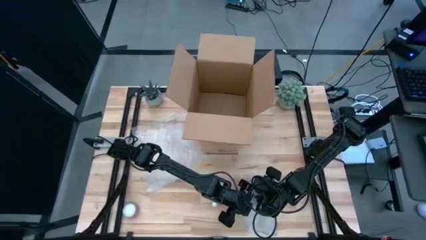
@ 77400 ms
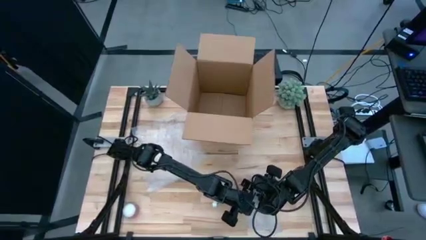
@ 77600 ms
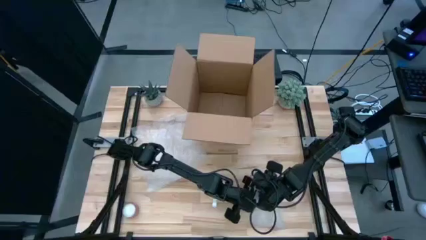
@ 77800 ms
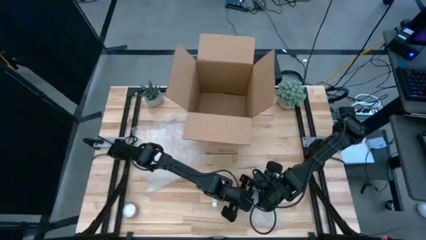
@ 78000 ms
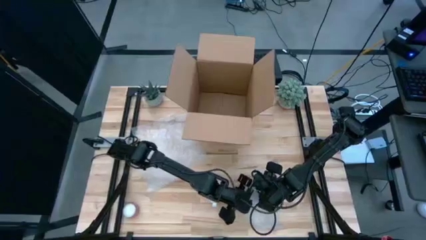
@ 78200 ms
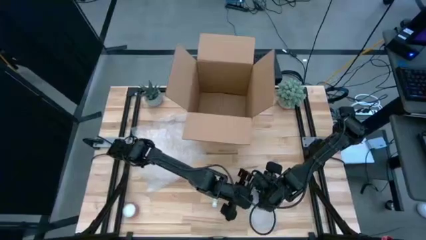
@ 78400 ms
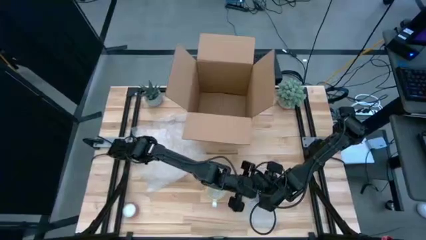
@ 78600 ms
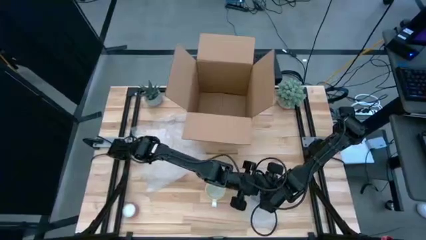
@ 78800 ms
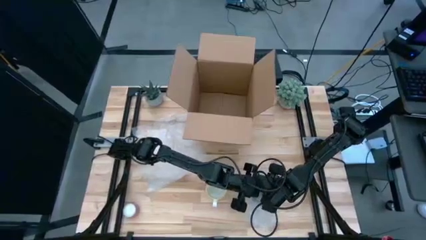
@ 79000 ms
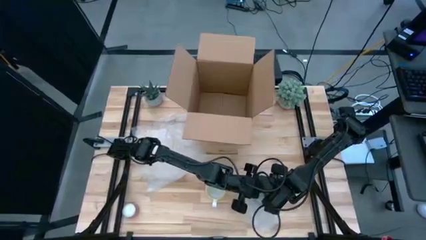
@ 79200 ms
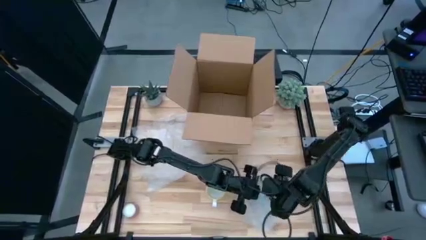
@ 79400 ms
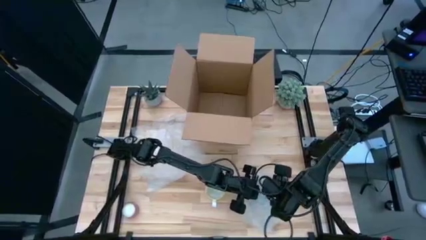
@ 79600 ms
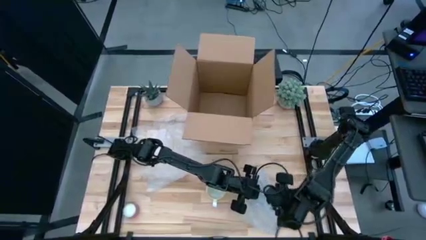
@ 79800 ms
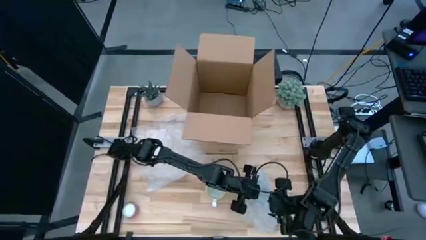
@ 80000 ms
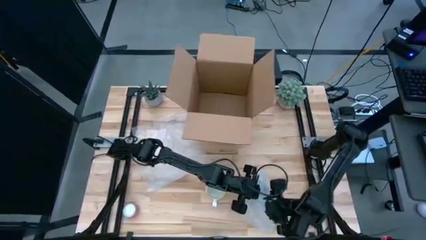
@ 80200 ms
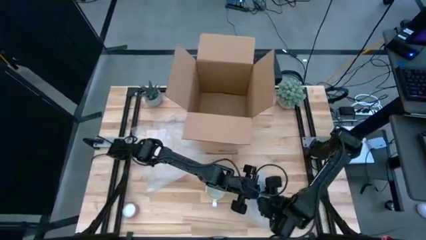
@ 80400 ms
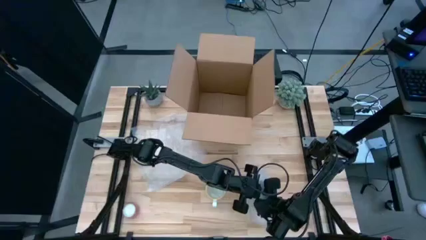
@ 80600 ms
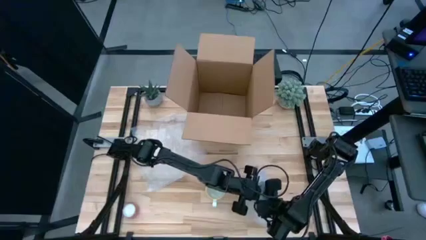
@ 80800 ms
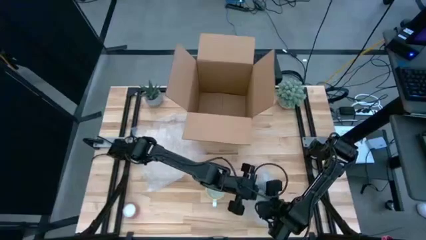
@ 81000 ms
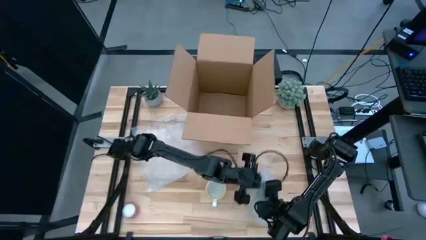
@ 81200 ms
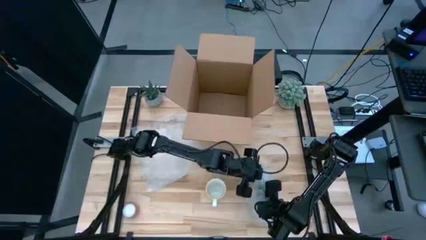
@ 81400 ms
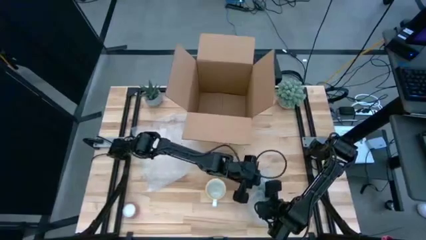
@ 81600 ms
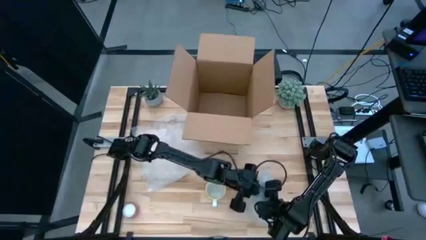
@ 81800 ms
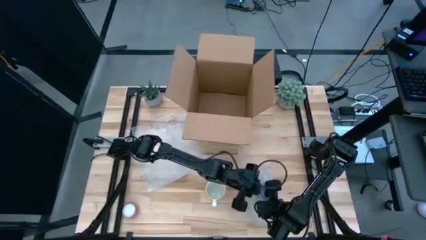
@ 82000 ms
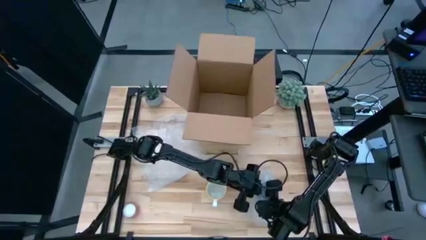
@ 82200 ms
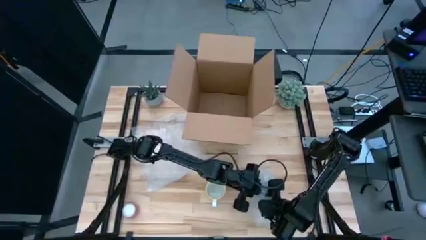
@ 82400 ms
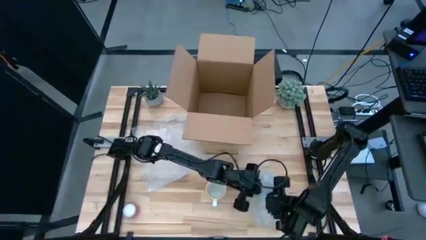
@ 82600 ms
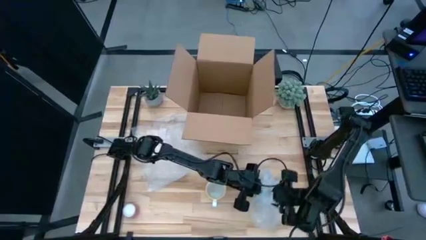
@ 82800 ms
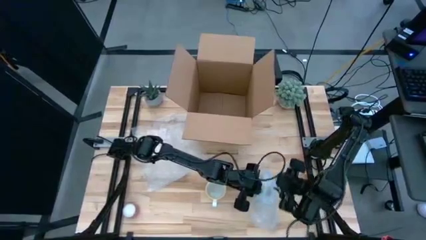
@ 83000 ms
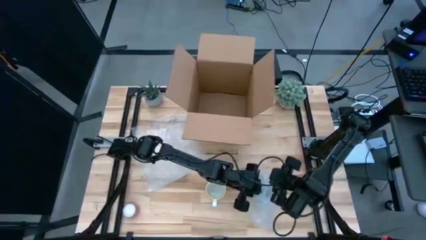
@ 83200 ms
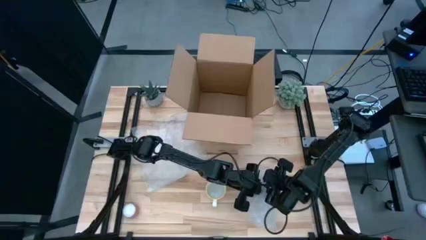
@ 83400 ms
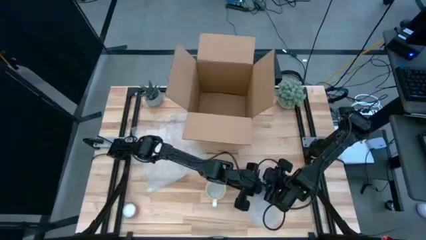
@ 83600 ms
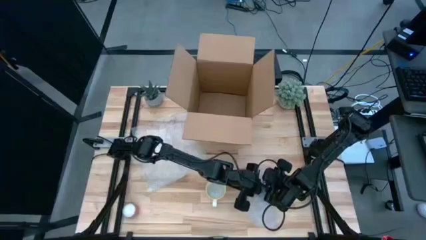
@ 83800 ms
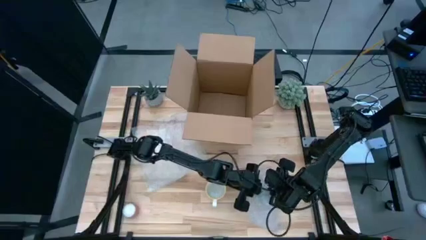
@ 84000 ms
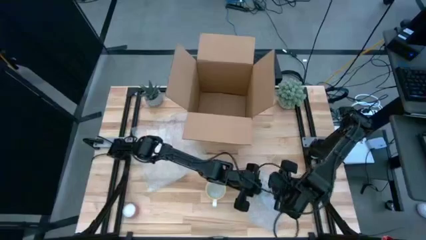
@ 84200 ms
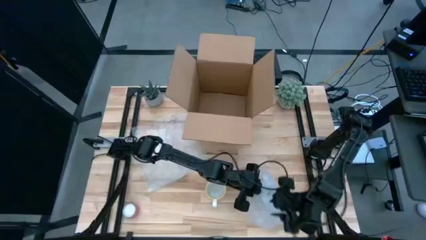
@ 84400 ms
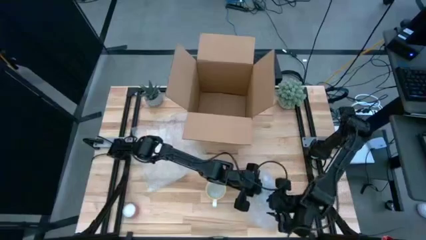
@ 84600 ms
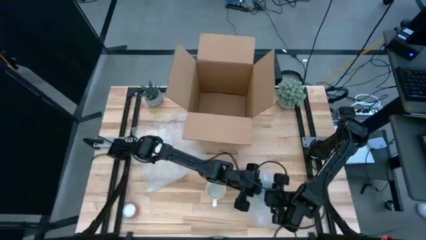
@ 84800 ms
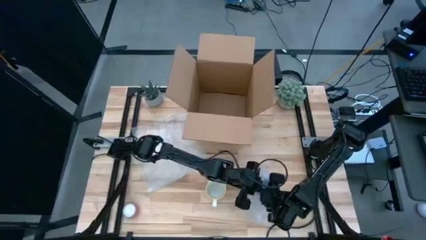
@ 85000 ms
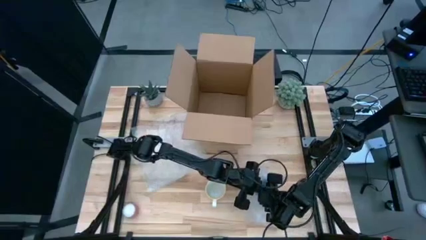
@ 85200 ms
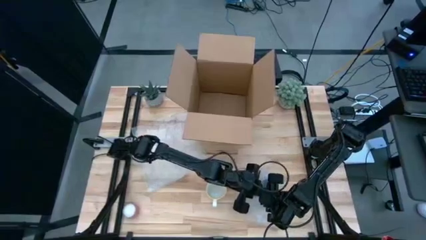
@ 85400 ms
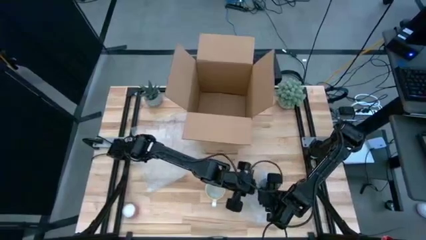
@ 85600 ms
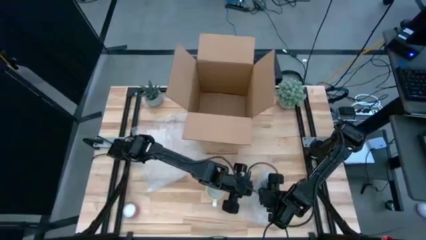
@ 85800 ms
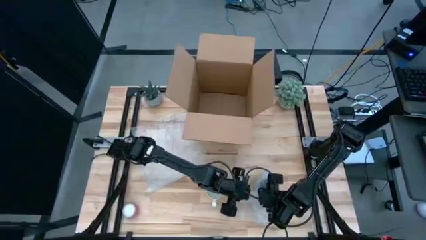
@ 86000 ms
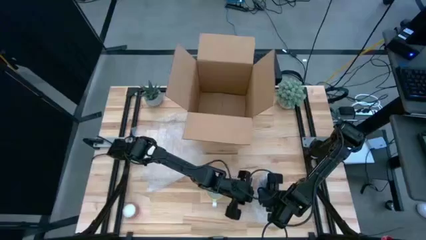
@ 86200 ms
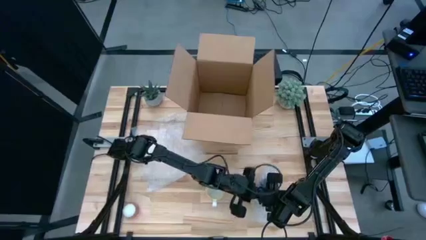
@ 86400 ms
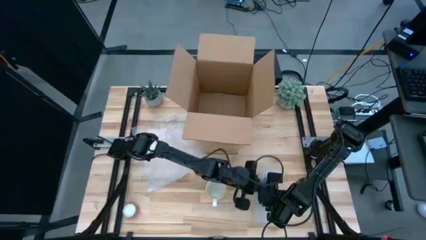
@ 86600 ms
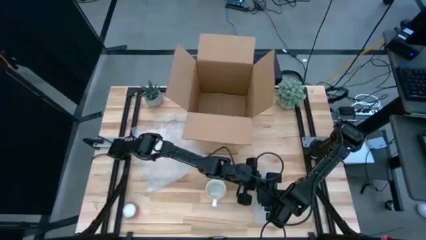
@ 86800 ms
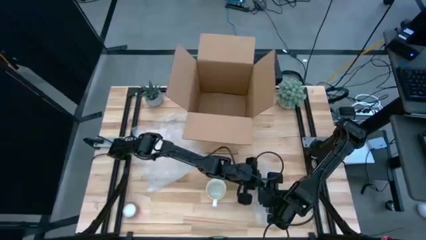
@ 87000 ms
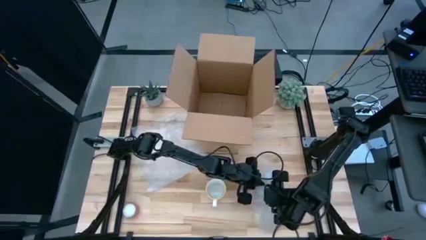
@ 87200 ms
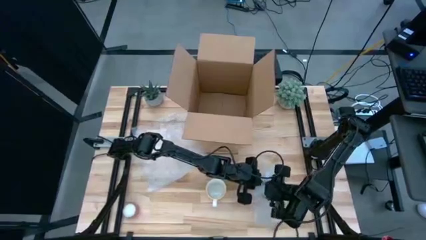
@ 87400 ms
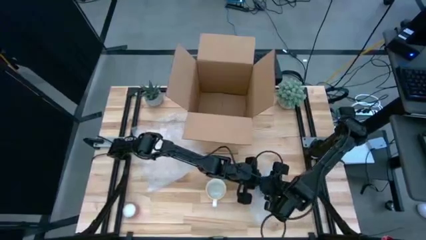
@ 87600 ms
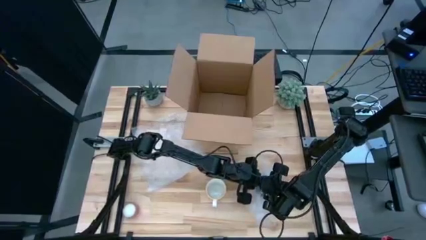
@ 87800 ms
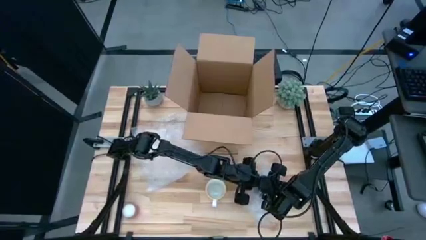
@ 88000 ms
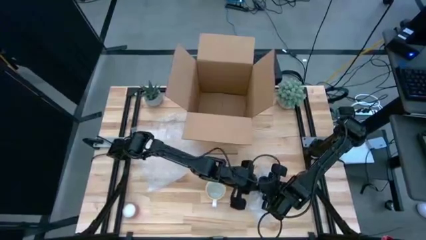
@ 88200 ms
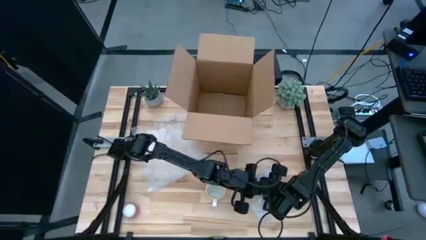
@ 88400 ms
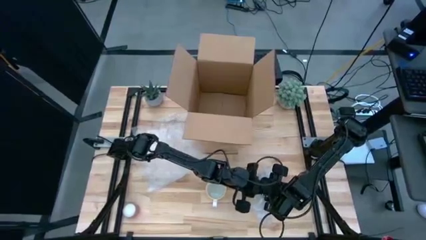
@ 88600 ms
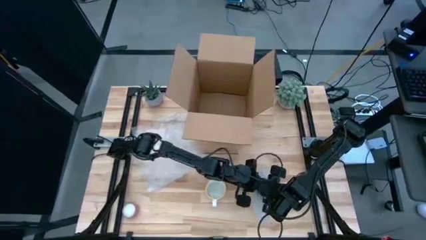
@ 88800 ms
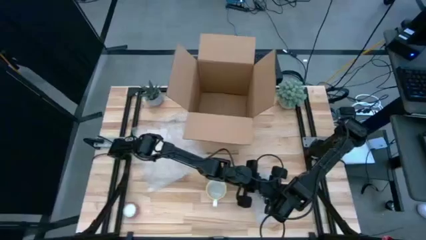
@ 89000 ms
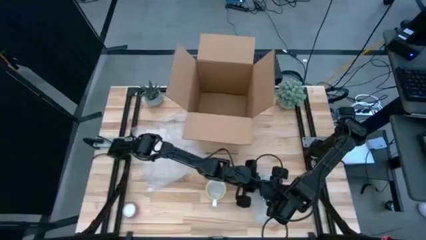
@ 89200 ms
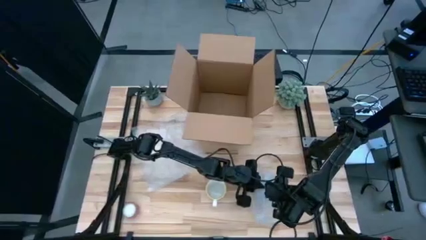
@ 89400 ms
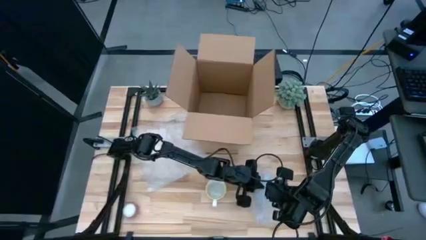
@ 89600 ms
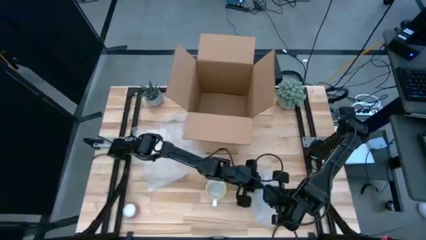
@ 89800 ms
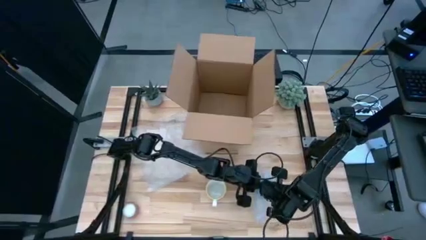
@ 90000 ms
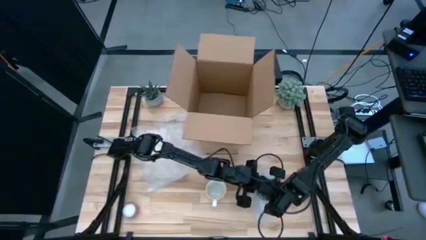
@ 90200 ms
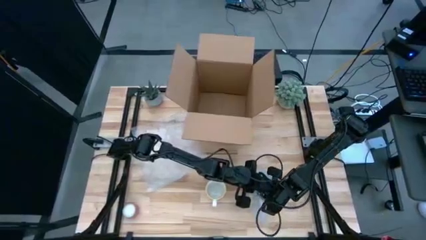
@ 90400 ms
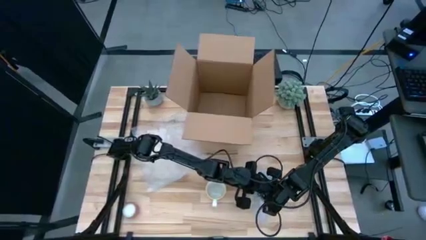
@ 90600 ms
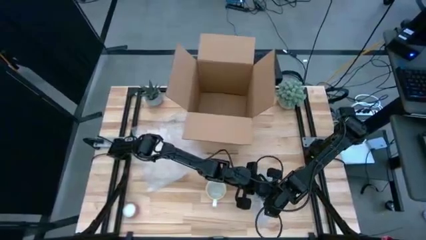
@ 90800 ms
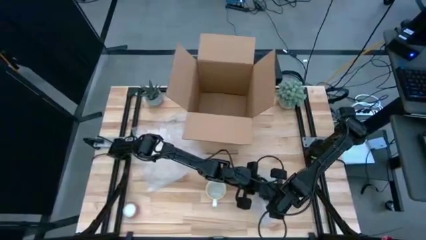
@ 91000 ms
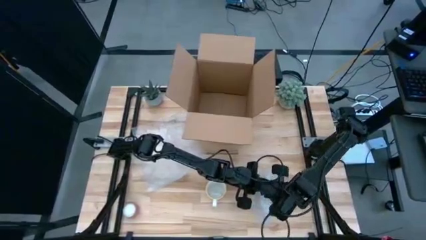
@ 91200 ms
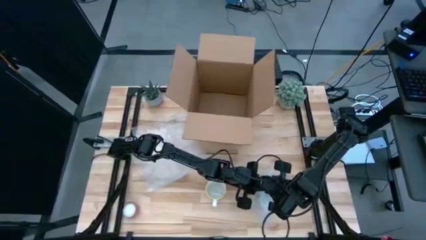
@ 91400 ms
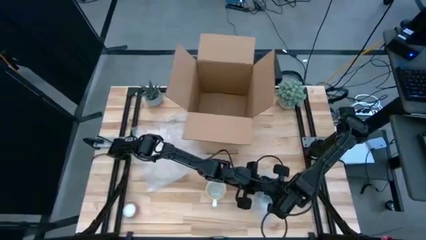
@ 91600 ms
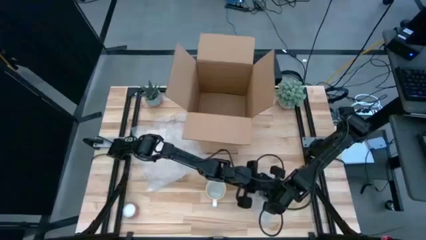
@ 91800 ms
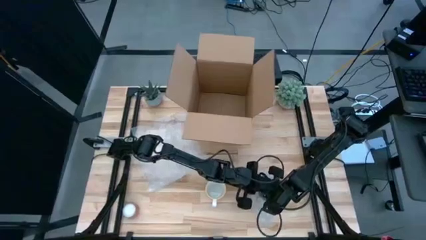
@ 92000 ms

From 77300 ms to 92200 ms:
Task: wrap mug
Wrap the red cup with the bubble wrap

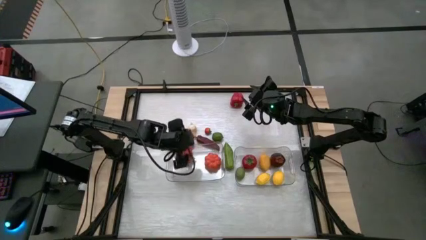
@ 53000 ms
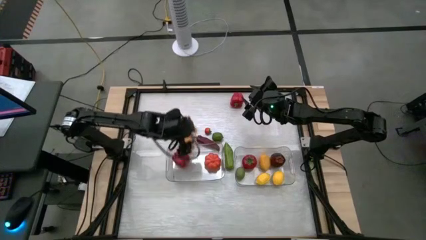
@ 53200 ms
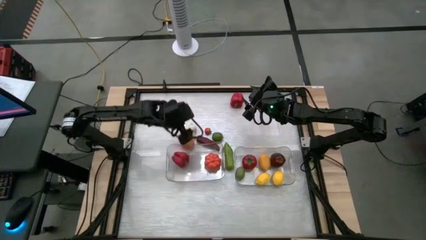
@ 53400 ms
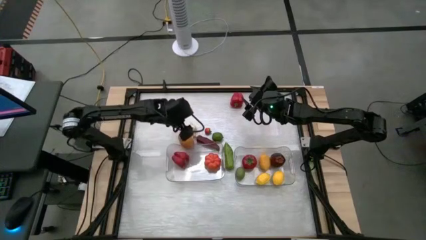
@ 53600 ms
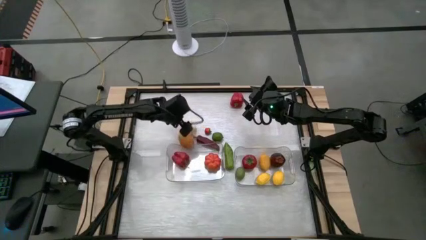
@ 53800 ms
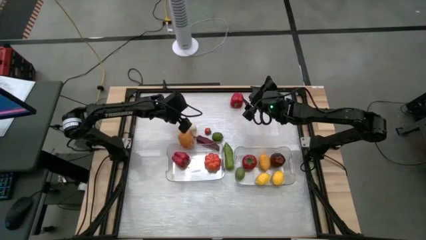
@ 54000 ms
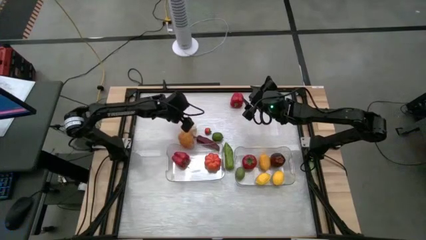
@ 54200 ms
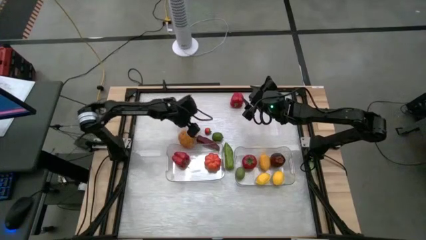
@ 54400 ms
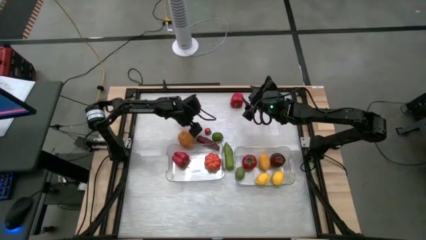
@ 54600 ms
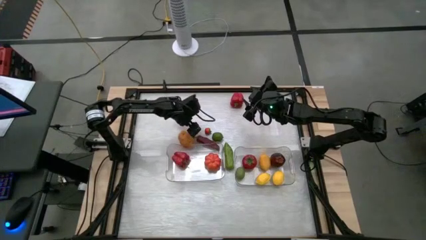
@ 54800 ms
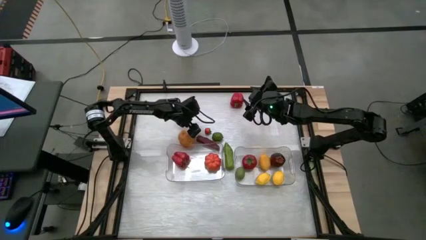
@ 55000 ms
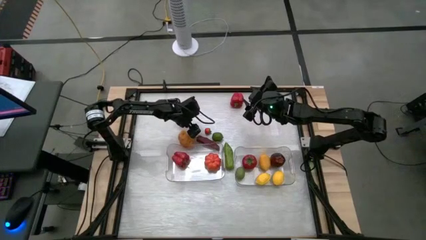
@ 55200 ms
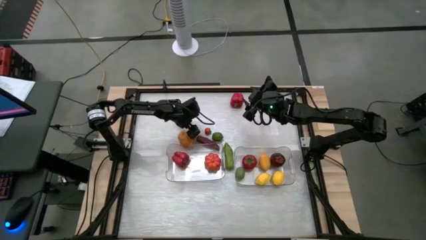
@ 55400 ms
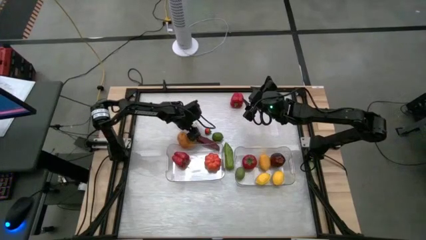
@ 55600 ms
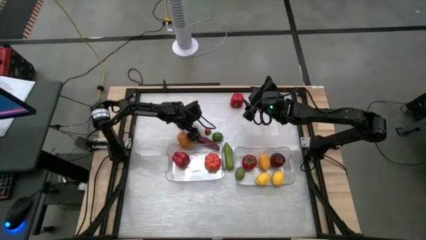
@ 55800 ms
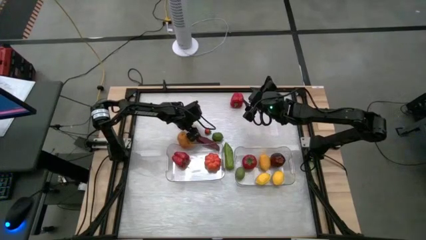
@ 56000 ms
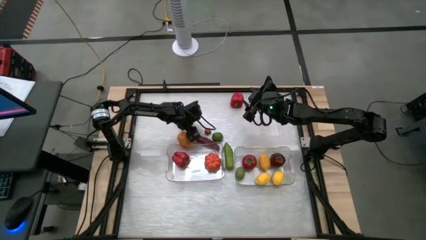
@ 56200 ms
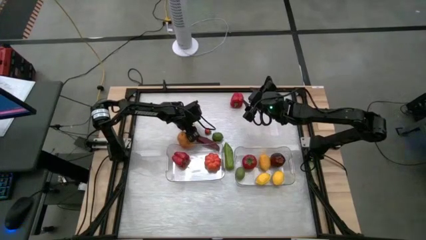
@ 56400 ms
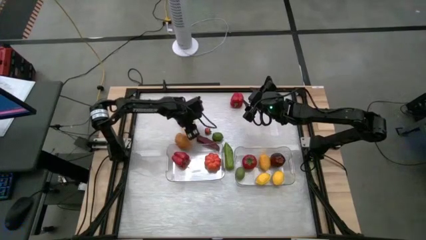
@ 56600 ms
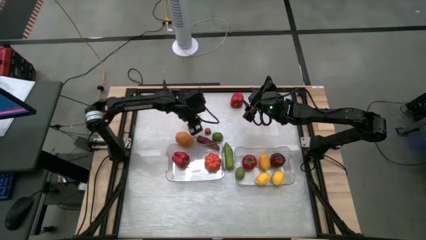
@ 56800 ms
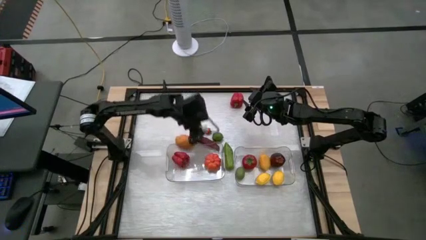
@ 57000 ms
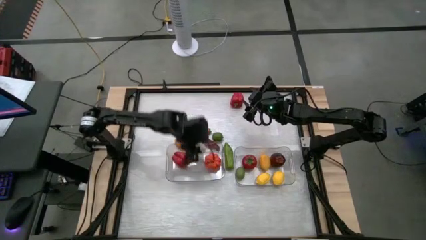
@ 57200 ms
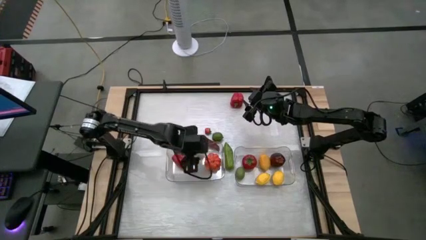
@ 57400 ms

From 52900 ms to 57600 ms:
Task: Sort produce into baskets
Put the garlic into the left transparent bin
